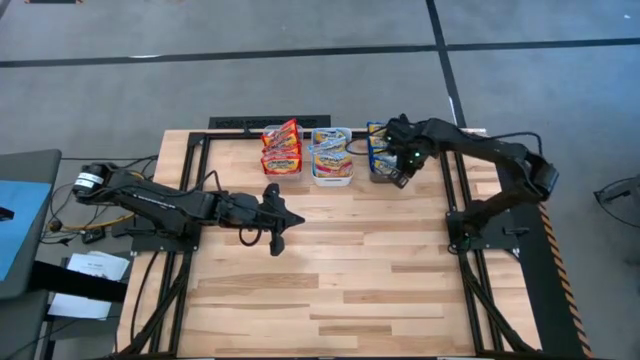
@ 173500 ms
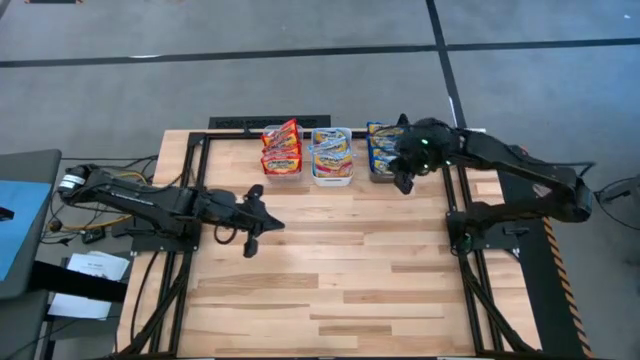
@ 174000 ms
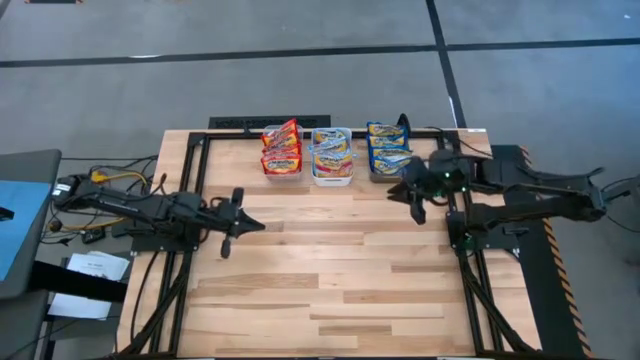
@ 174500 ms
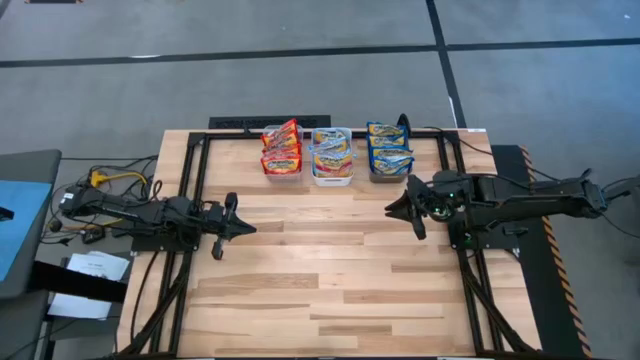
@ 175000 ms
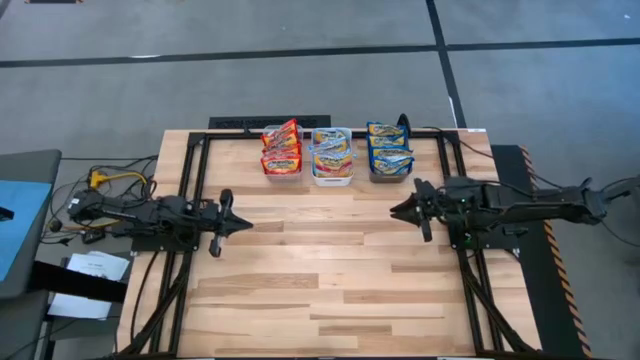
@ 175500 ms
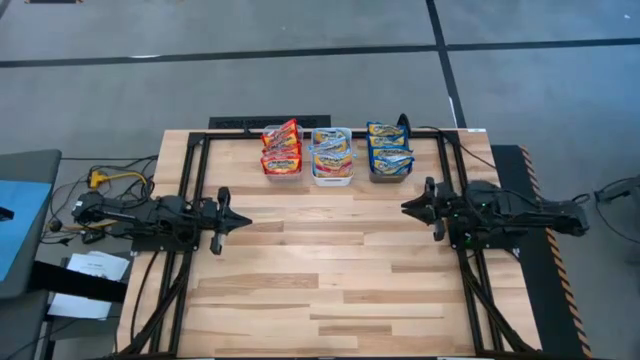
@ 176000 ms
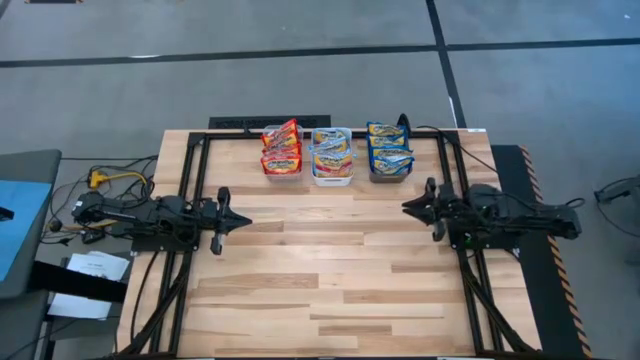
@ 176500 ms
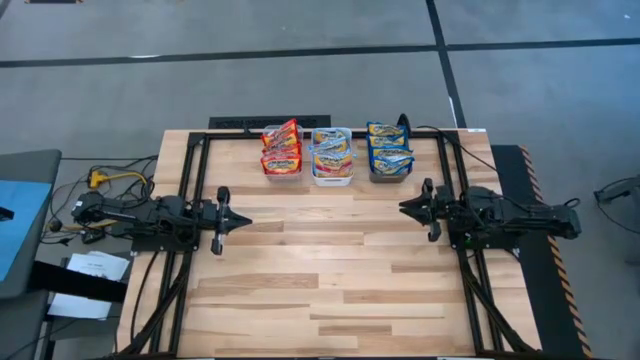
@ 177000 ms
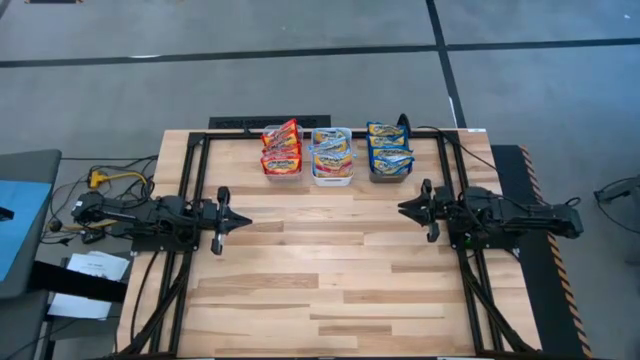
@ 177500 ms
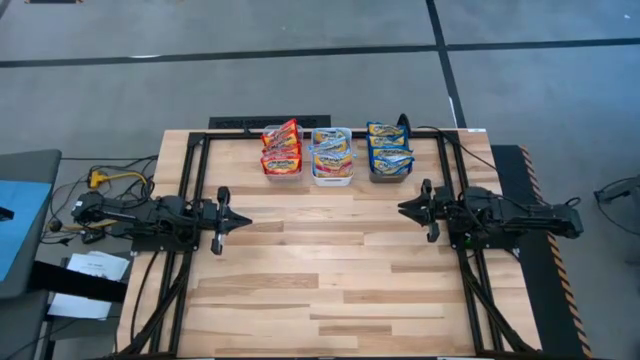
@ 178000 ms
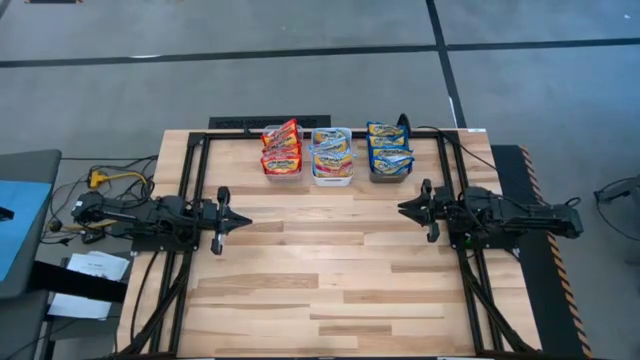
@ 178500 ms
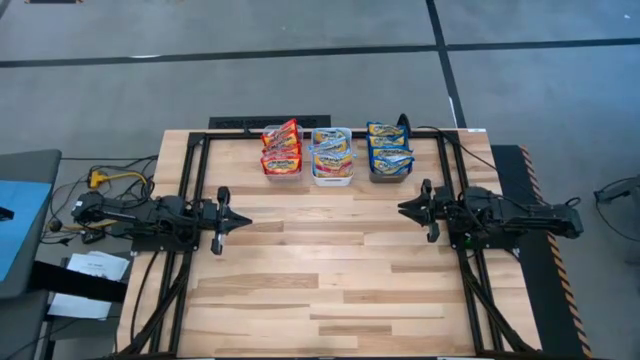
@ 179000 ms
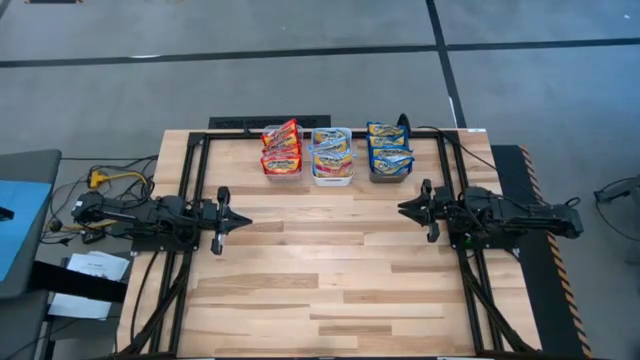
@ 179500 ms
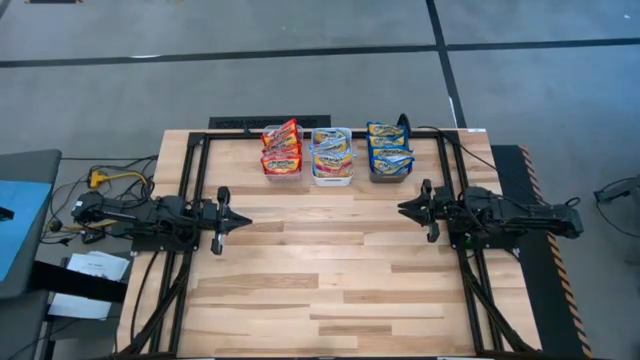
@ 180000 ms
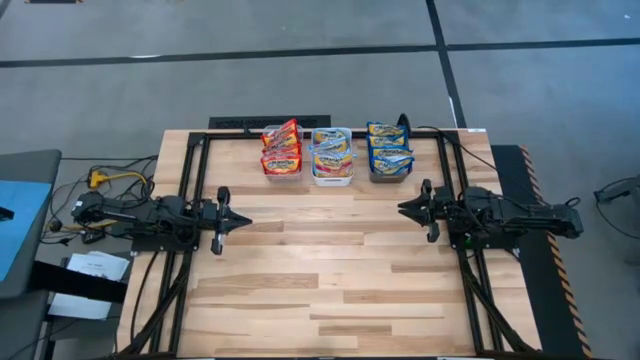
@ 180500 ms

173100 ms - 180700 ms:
Task: Sort Maruchan noodles
Return to Home Position

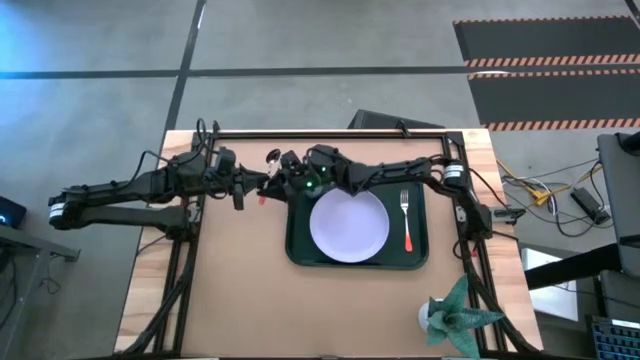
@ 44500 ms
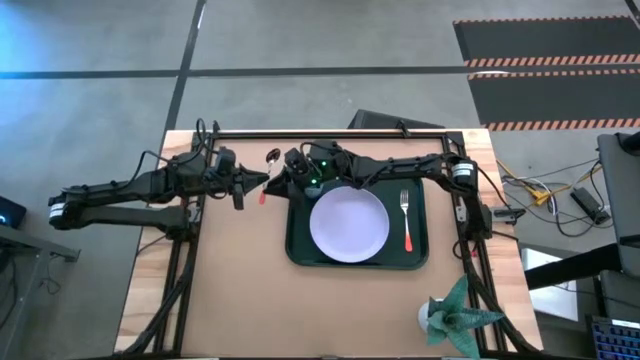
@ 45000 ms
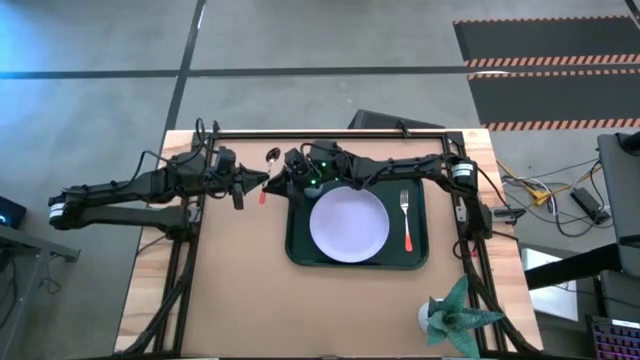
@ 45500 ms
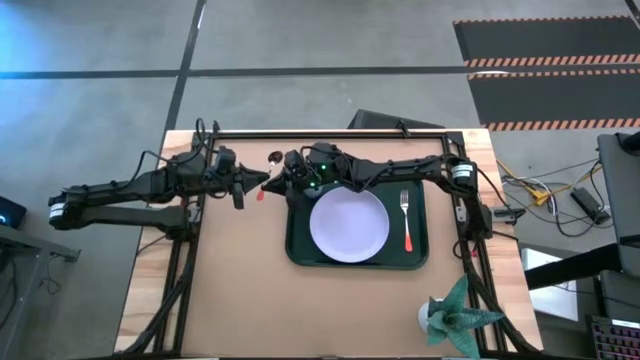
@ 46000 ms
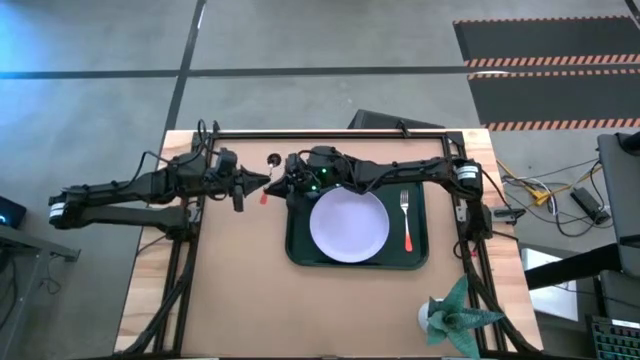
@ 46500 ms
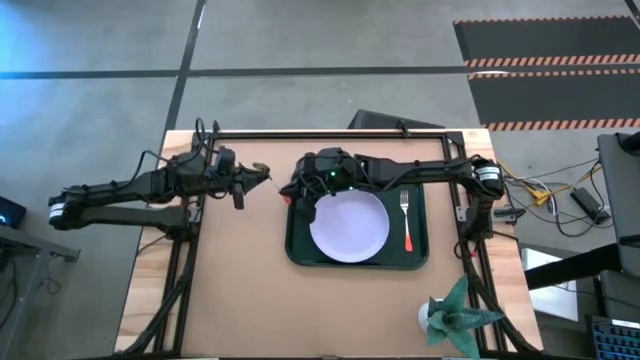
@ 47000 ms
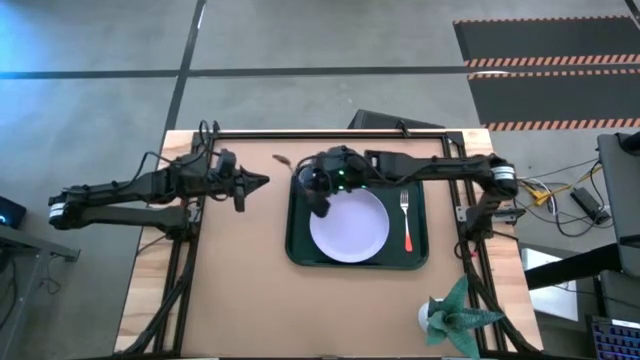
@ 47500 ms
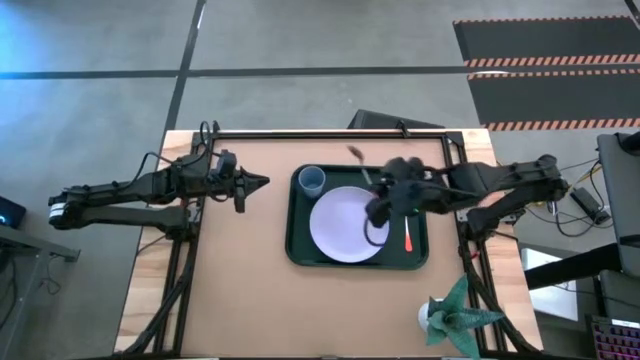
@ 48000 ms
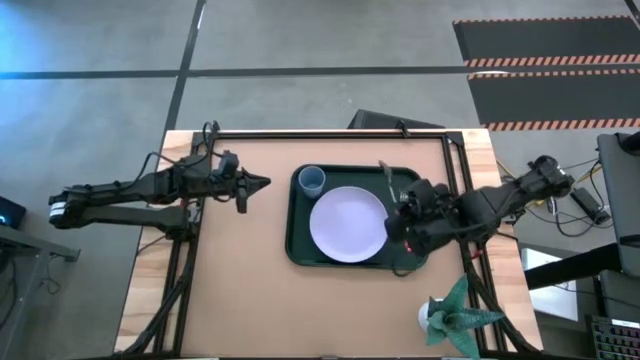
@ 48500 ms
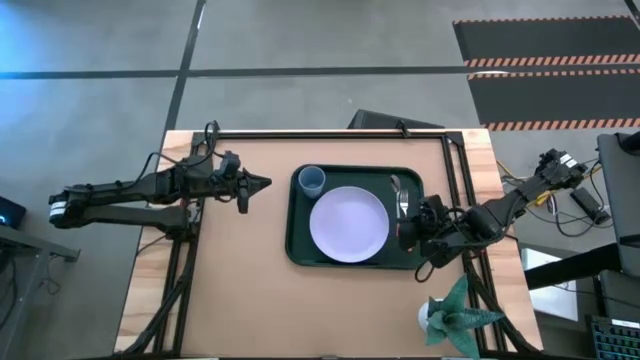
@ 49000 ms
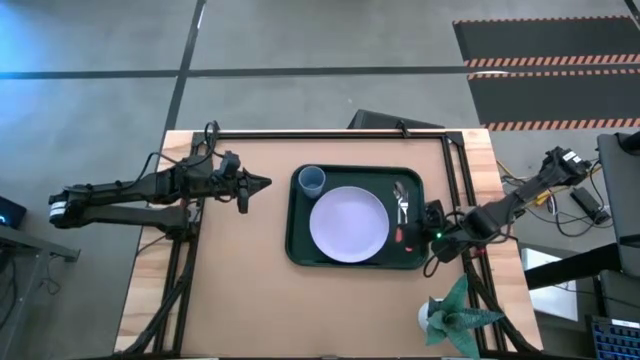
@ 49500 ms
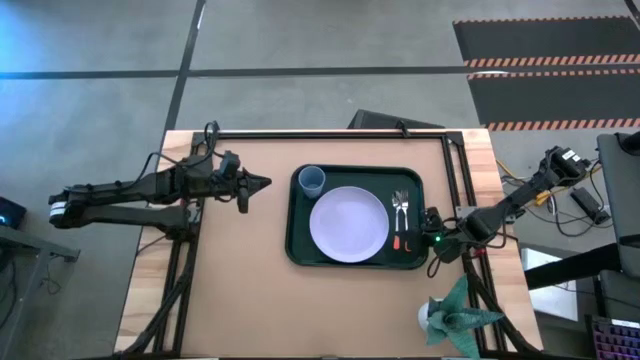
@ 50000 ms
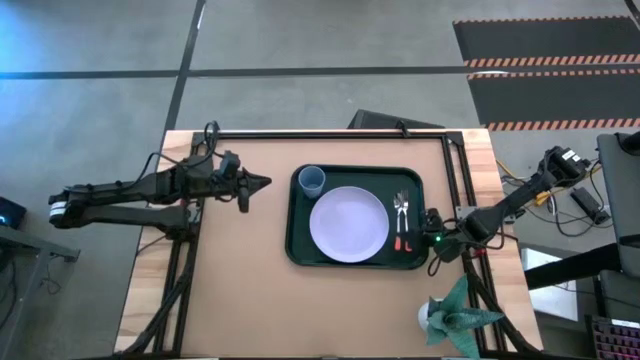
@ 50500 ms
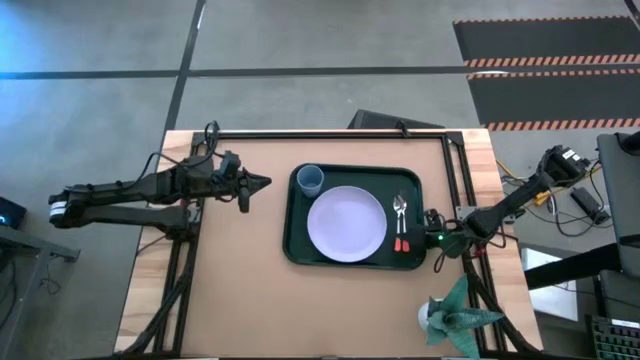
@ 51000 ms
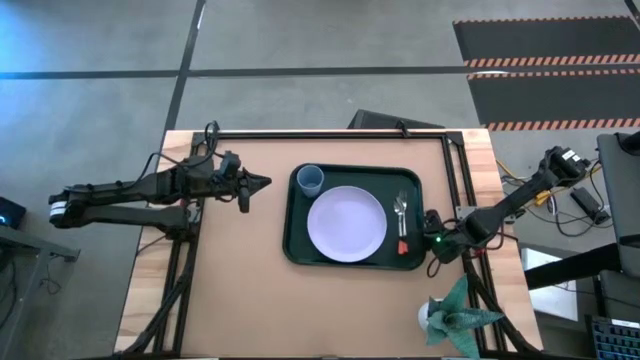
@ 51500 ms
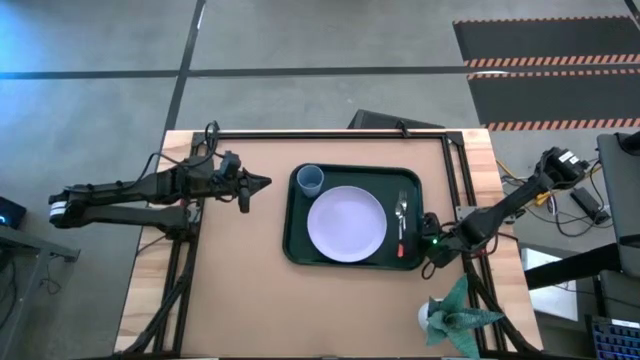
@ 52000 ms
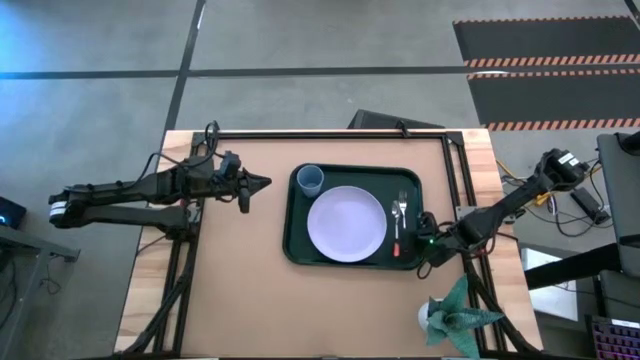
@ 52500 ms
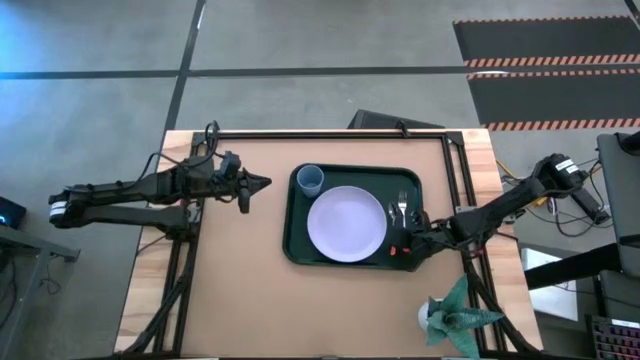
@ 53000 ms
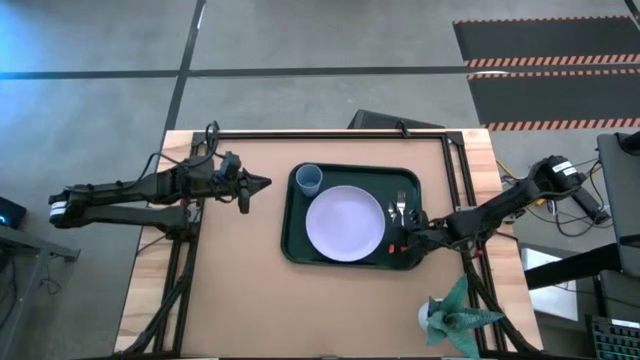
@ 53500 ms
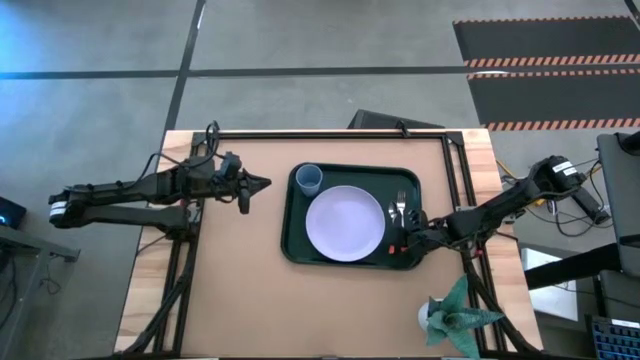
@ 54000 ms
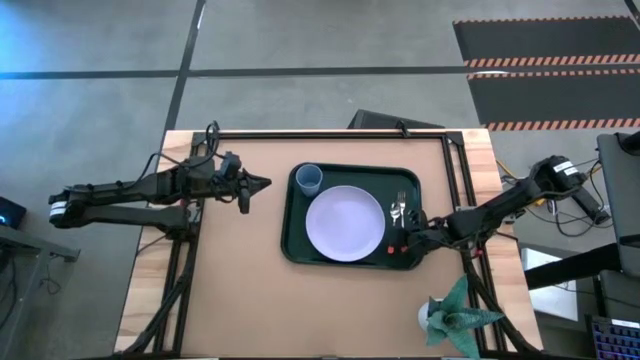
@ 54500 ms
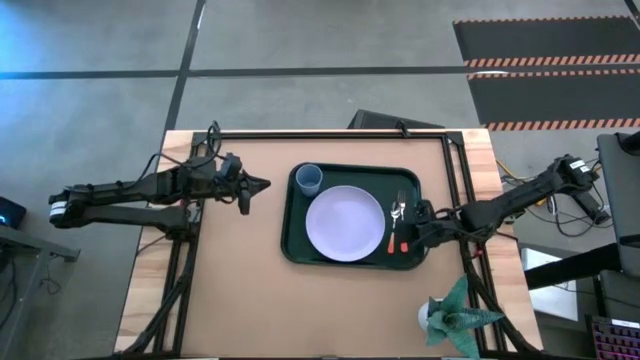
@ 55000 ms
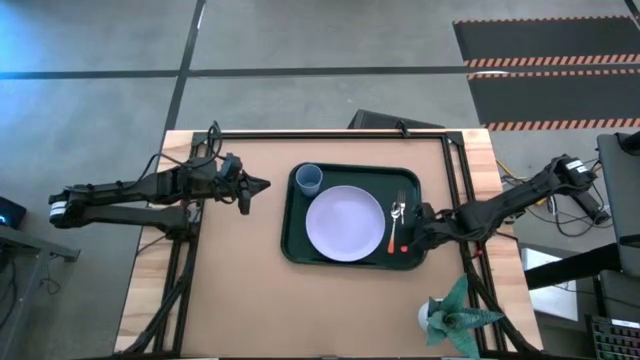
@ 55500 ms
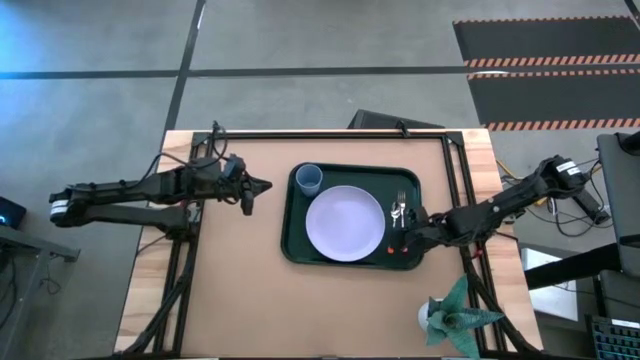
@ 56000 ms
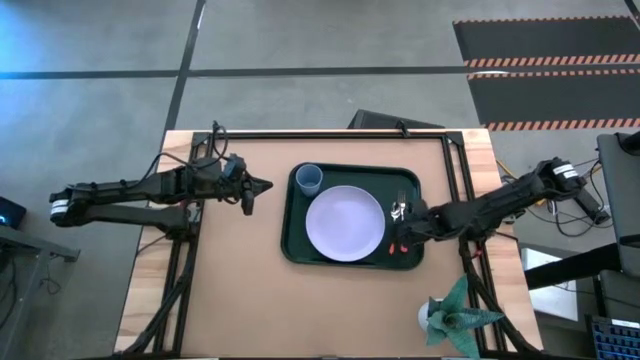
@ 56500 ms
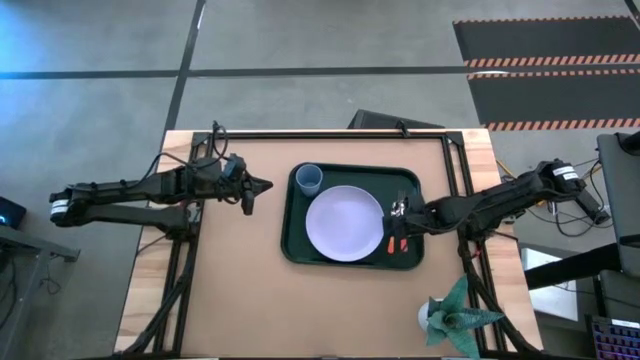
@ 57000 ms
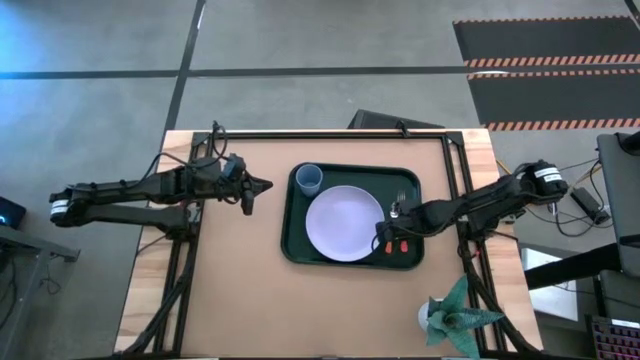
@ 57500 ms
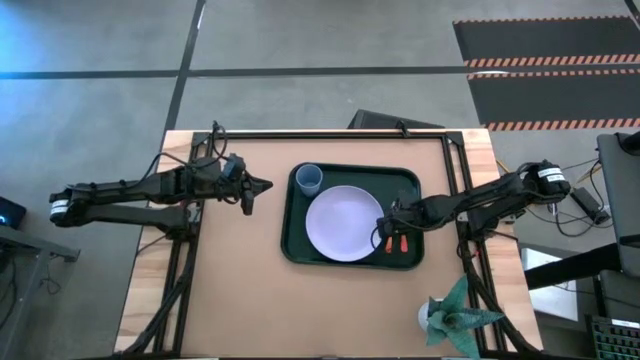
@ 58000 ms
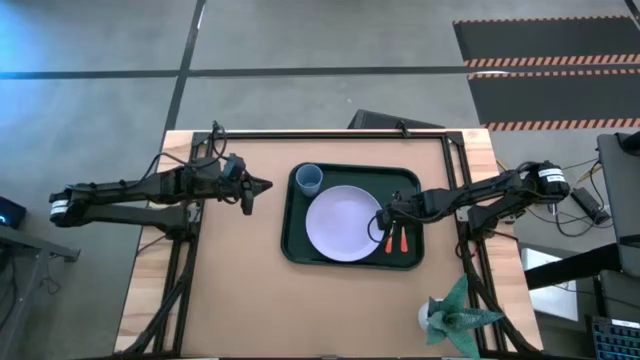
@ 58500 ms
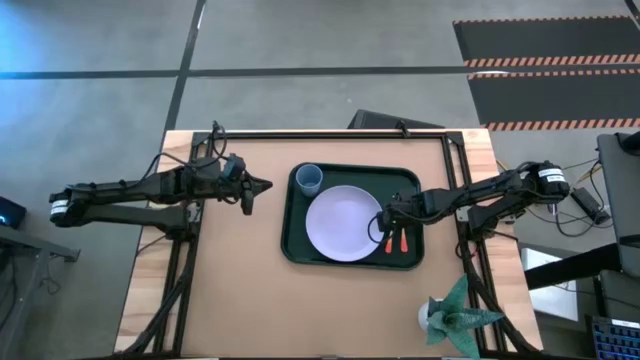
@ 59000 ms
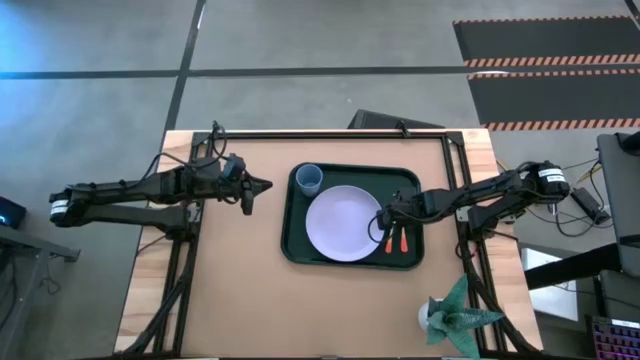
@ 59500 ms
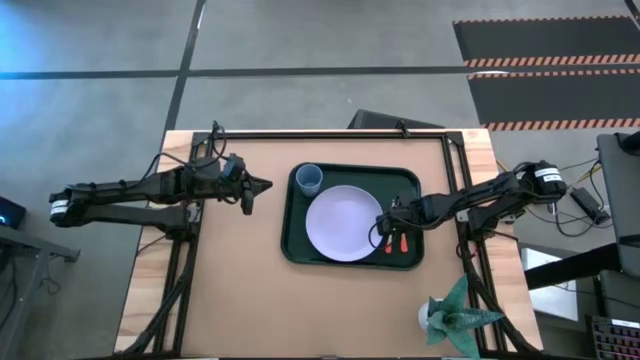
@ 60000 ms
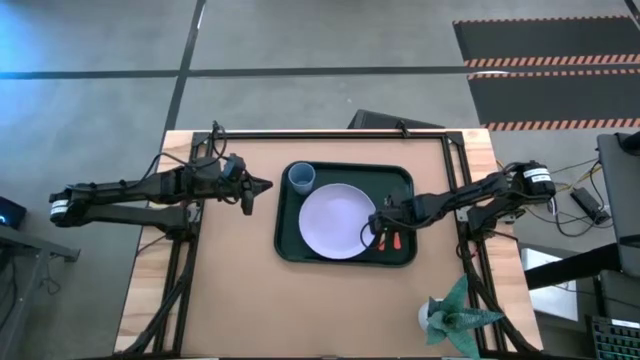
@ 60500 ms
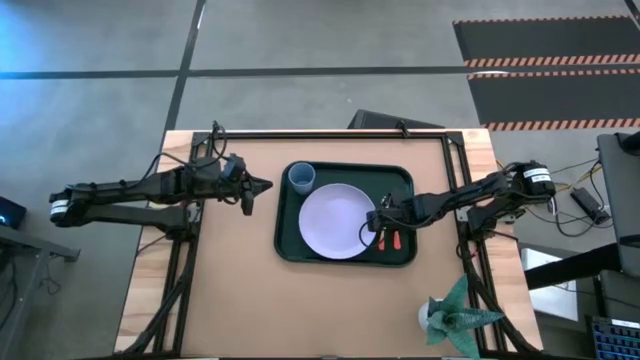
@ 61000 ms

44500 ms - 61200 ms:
Task: Pick and place plate/cup/fork/spoon on tray
Put the orange spoon on the black tray to the middle of the violet plate and orange fork
